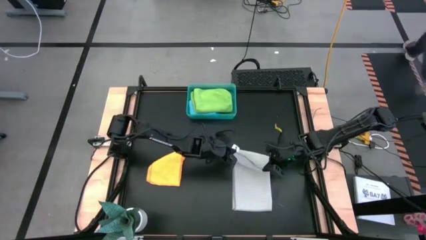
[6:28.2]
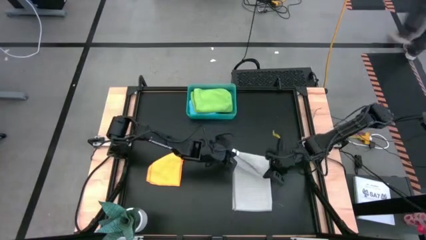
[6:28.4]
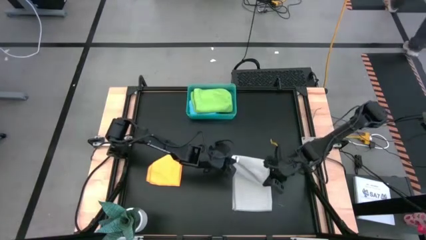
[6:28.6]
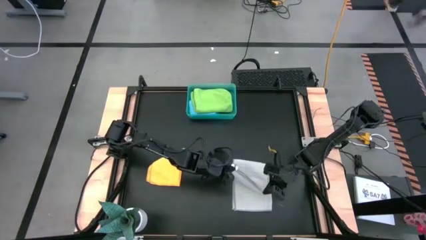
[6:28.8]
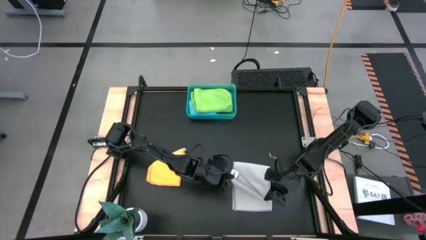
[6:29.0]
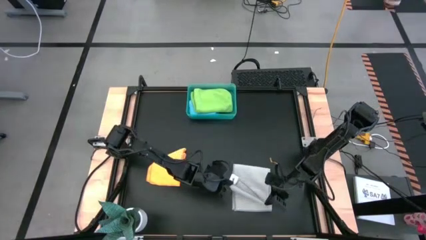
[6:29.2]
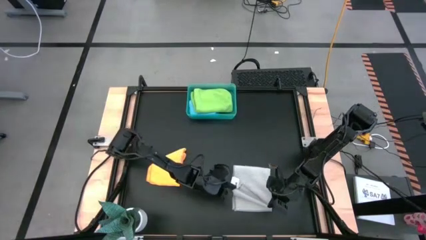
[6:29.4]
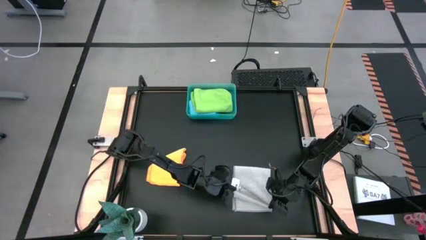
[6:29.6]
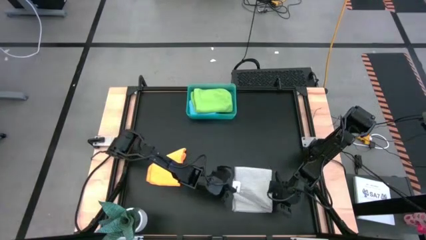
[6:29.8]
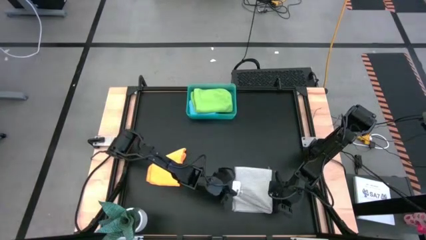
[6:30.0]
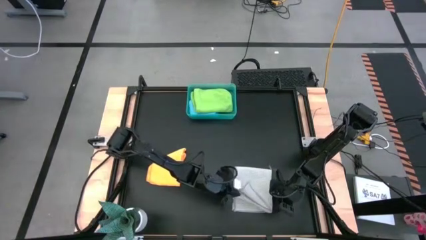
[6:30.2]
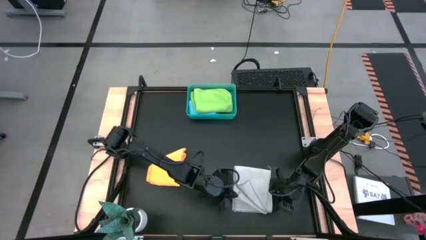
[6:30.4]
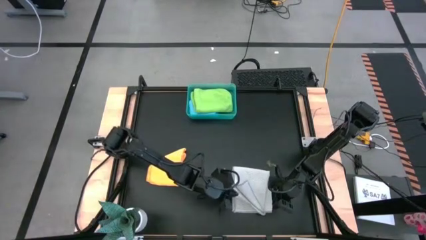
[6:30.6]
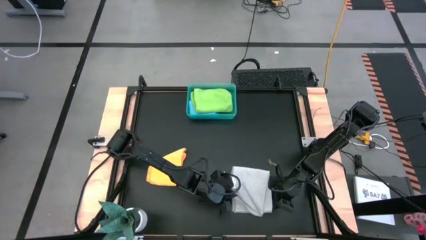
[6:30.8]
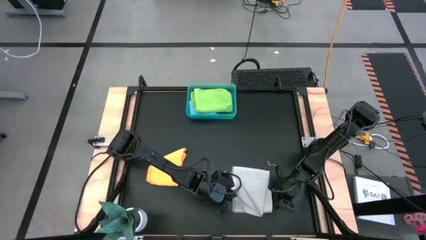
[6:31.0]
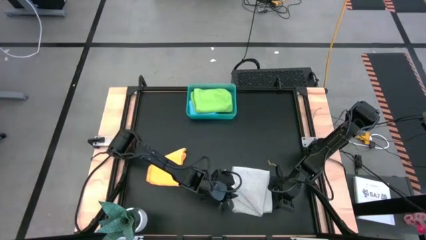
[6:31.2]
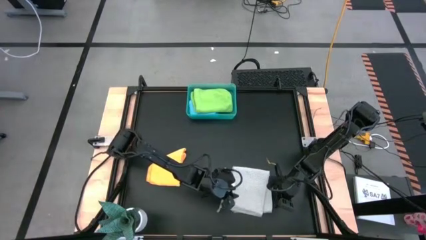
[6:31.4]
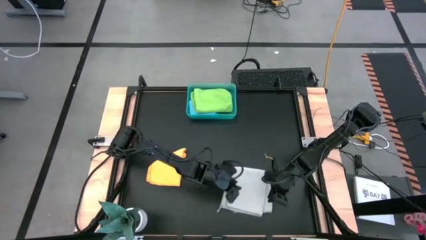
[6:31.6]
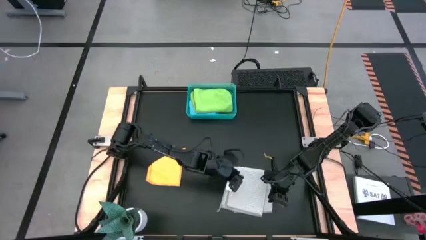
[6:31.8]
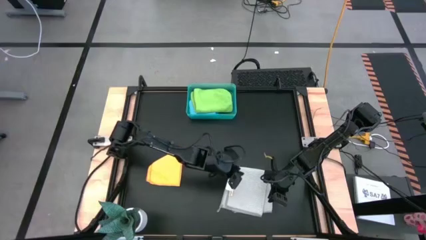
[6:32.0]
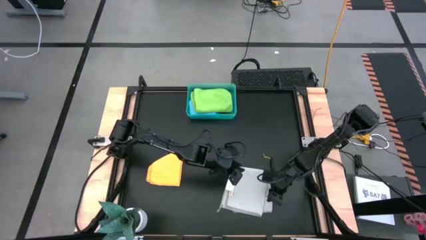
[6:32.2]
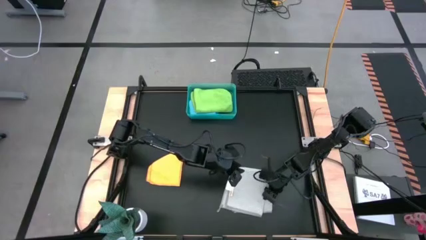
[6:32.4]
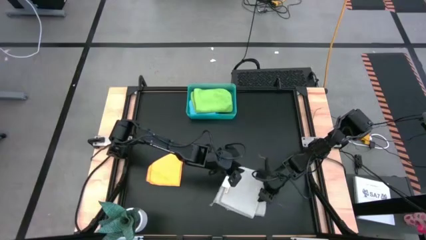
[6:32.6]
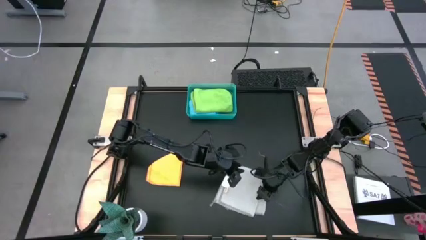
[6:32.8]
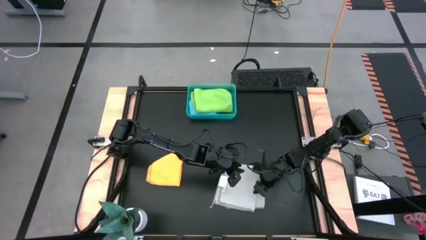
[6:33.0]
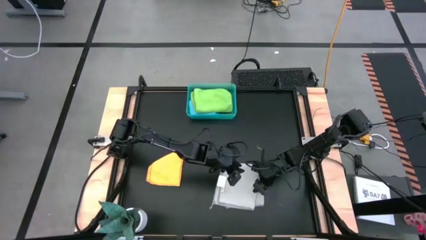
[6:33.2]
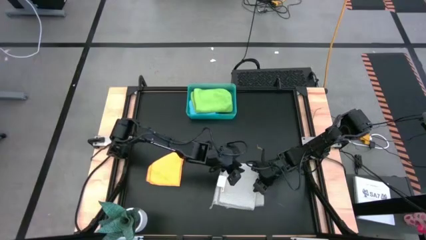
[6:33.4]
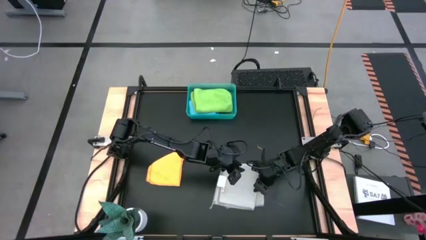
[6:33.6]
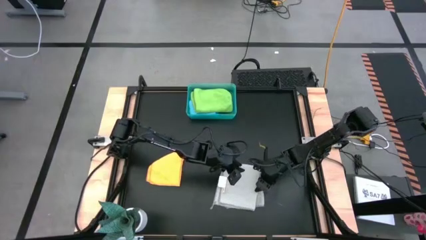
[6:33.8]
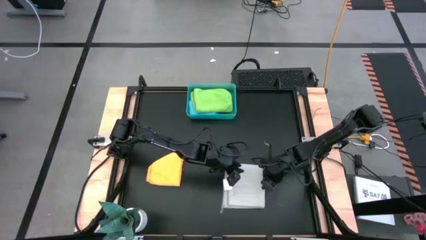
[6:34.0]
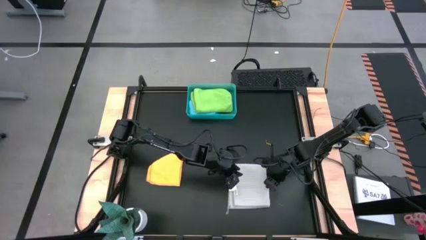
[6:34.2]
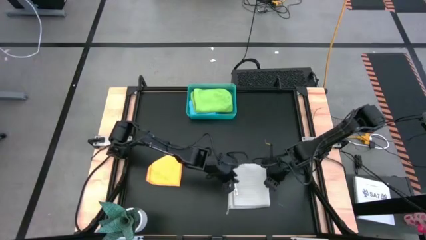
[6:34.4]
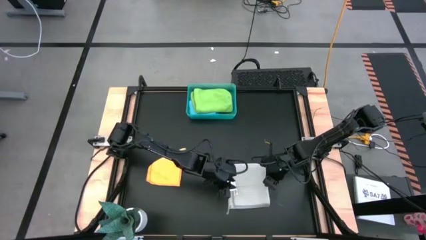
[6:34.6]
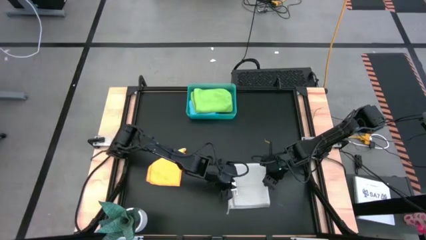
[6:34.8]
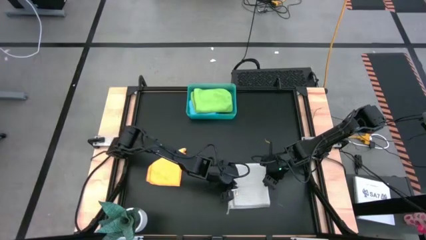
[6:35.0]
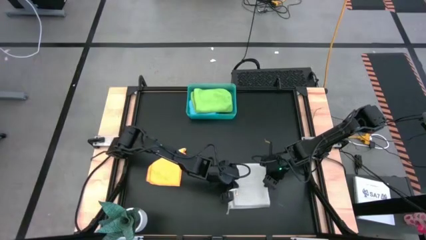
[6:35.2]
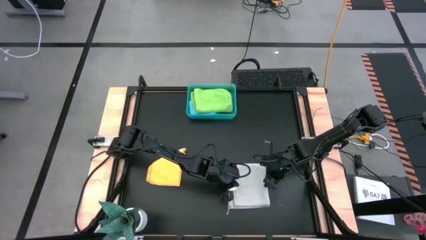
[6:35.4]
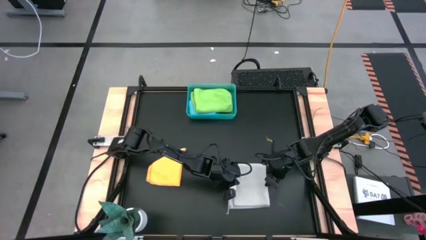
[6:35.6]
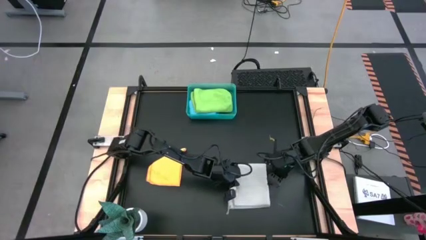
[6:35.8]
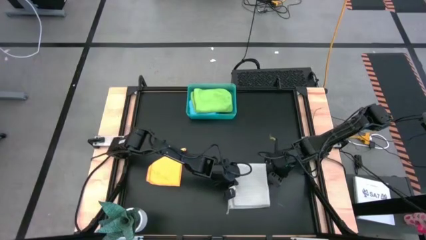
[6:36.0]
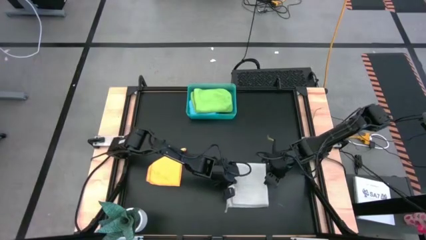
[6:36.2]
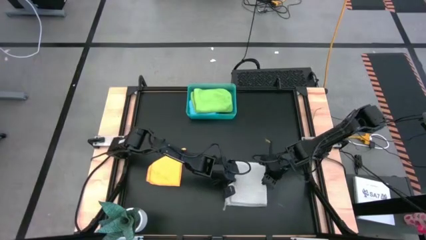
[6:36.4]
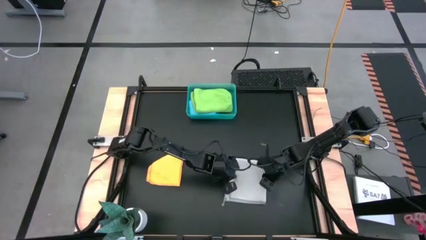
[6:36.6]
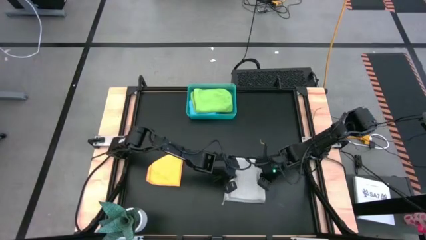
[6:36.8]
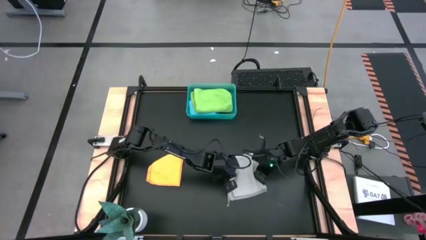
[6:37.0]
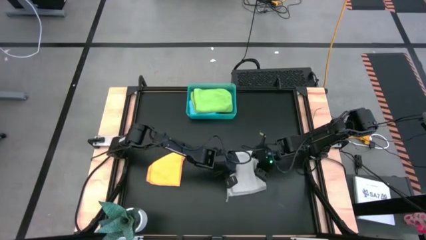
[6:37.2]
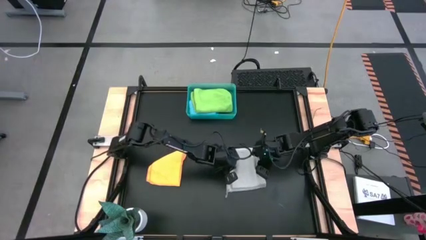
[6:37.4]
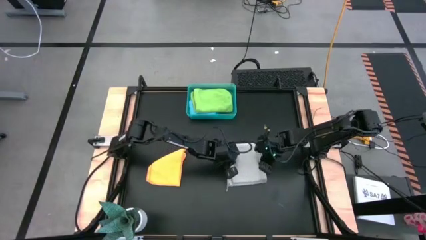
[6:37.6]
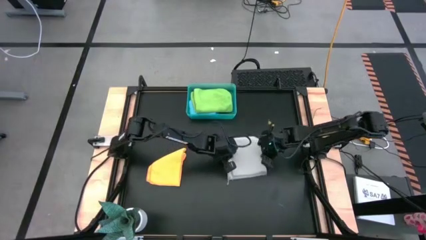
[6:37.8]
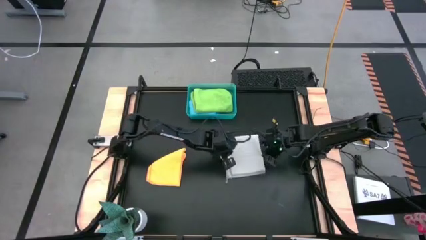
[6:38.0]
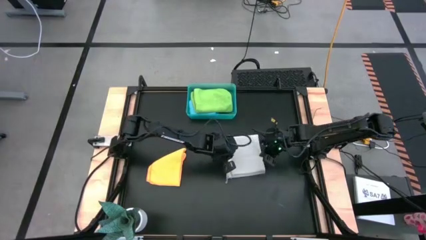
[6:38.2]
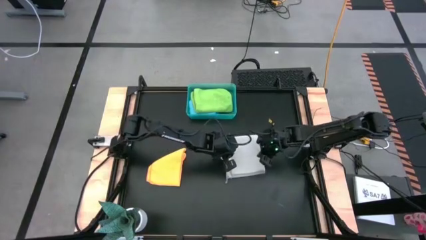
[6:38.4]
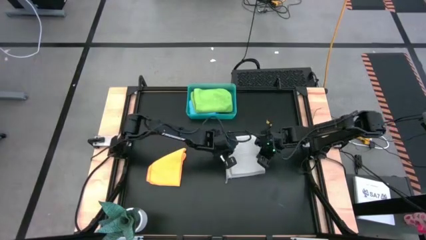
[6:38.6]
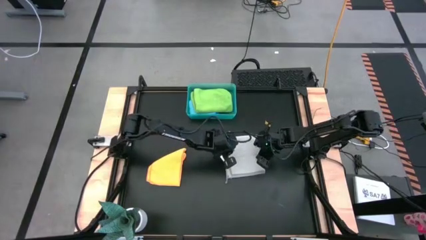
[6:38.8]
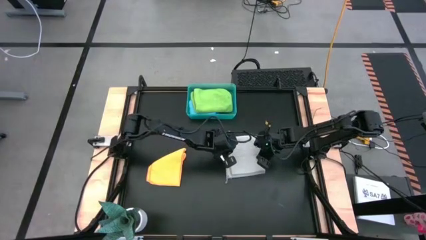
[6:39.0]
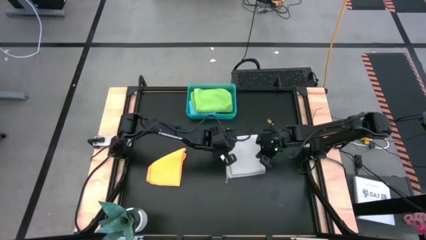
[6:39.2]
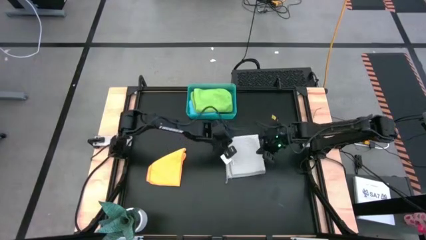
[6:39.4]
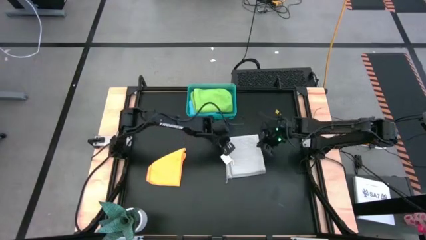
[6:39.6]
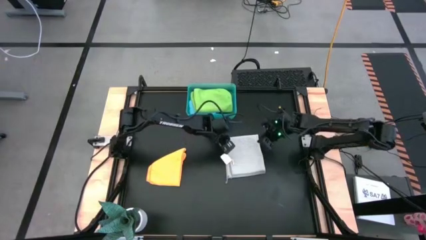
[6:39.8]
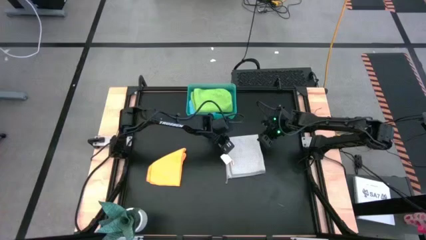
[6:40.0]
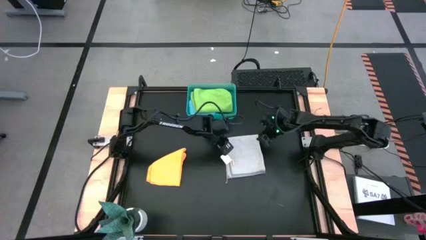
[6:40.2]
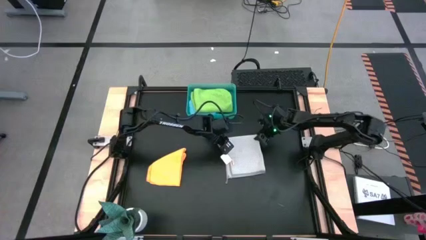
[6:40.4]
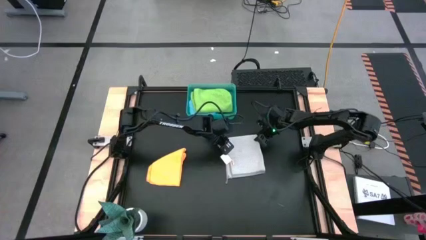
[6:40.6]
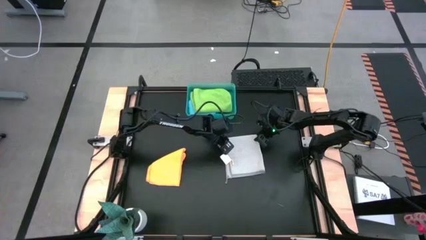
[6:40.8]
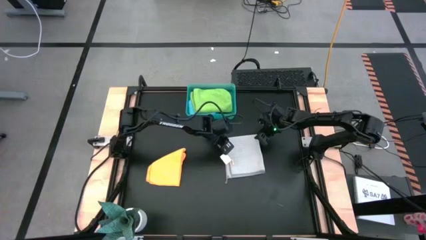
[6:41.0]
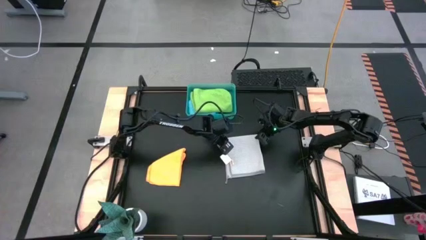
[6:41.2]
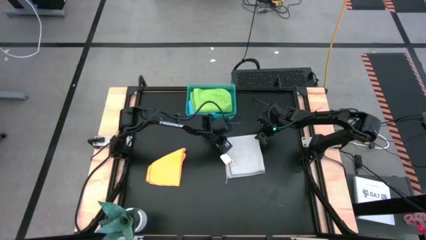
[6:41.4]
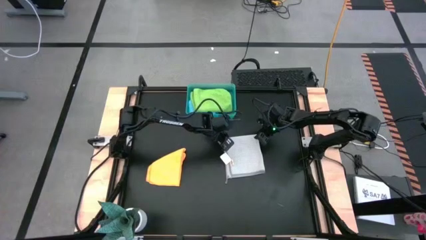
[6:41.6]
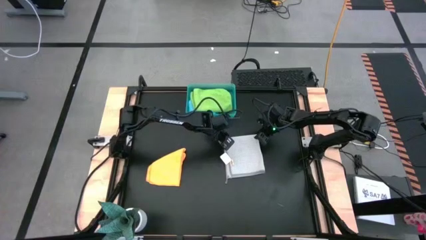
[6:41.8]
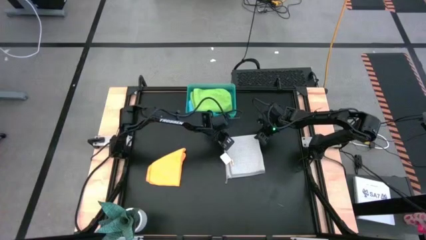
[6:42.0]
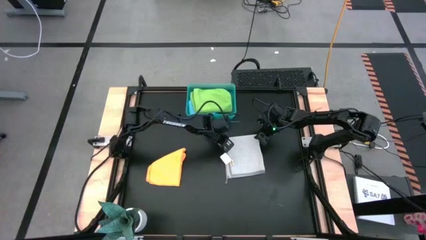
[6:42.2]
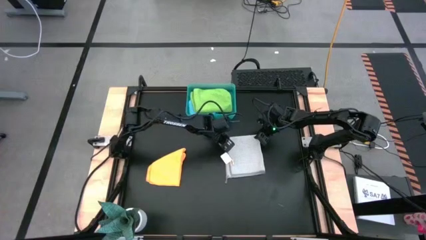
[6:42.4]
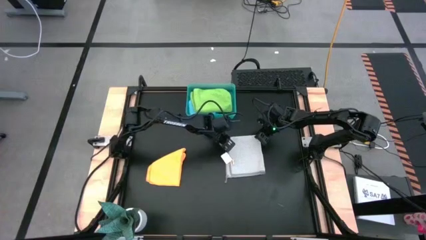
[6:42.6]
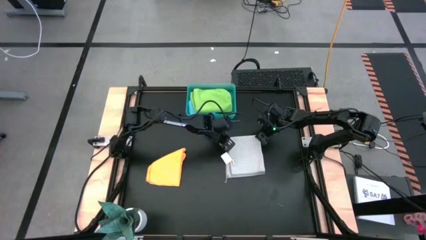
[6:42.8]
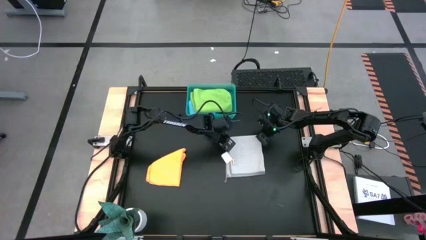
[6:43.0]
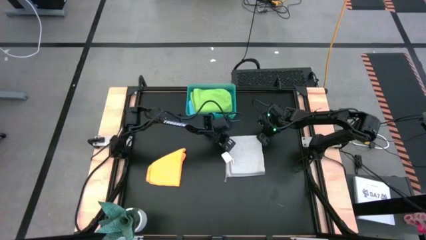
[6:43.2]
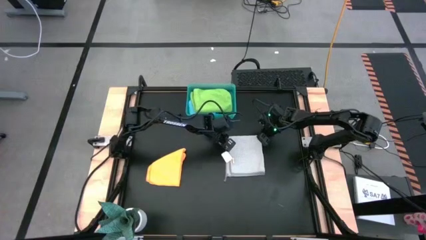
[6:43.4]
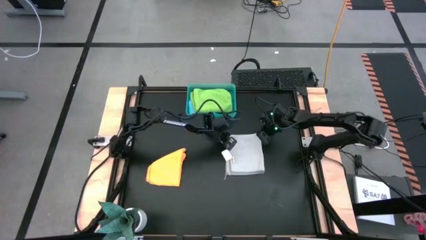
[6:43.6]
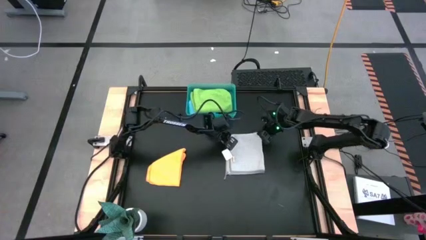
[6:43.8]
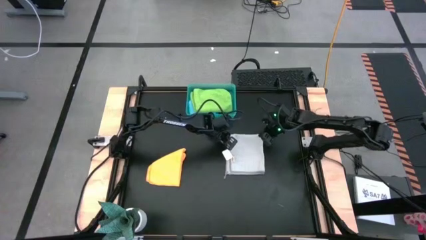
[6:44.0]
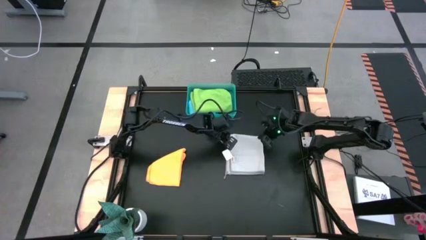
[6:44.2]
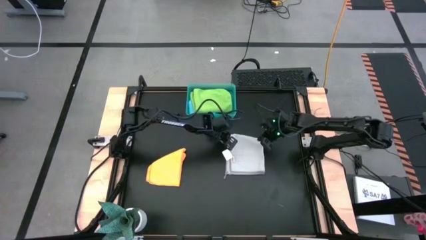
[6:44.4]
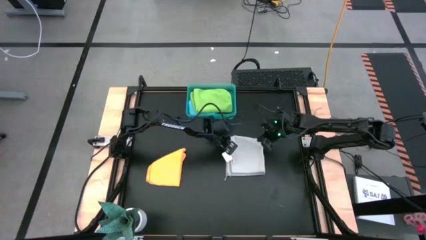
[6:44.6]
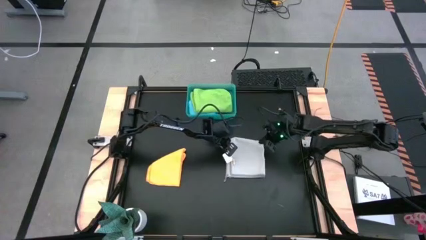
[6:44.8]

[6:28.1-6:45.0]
Task: Fold microfiber towels
Fold the gray towel
